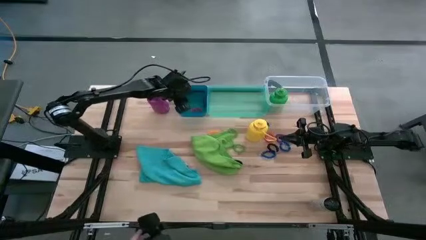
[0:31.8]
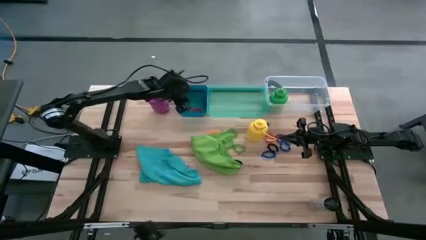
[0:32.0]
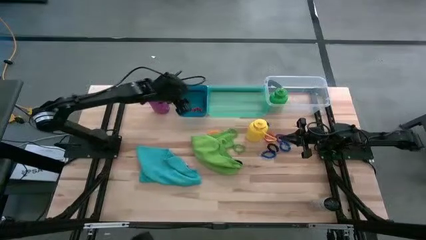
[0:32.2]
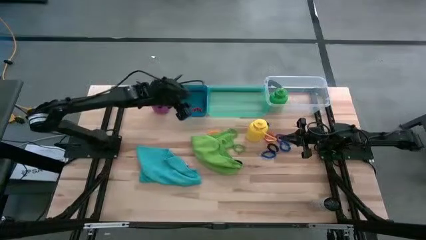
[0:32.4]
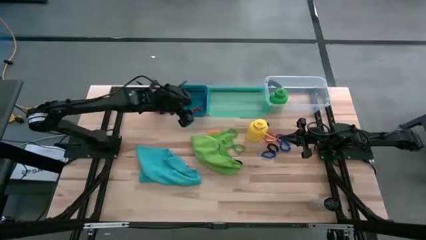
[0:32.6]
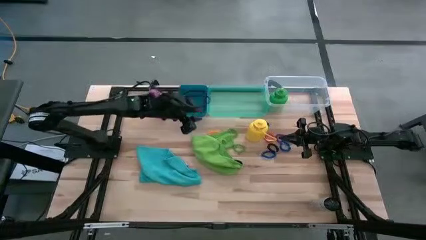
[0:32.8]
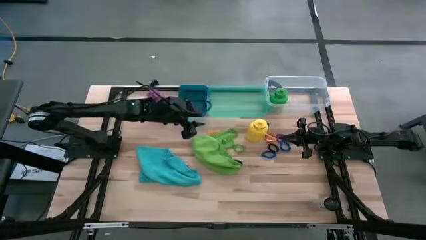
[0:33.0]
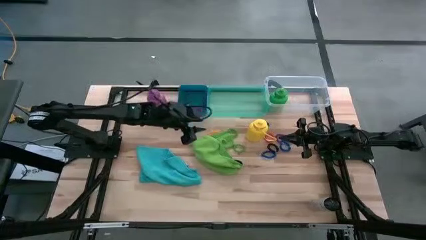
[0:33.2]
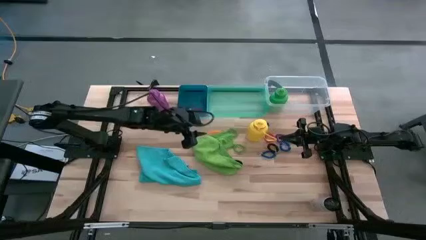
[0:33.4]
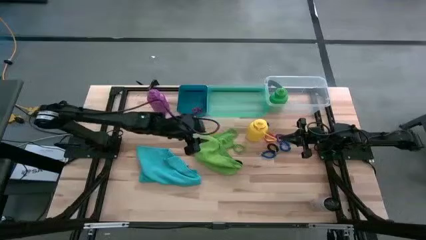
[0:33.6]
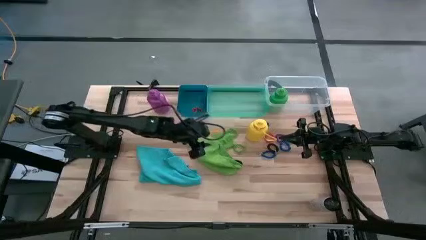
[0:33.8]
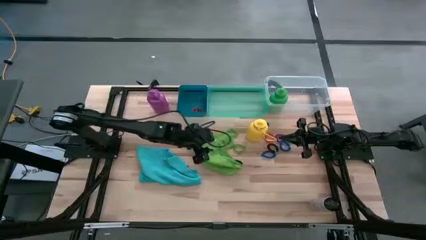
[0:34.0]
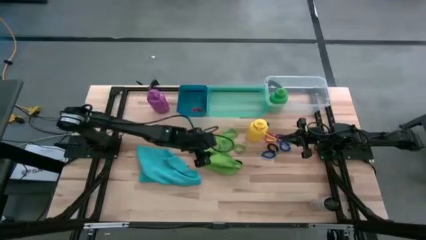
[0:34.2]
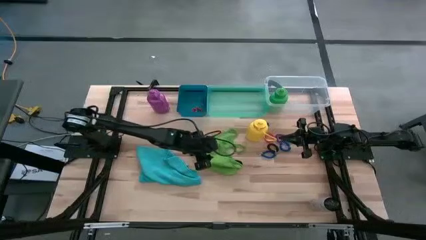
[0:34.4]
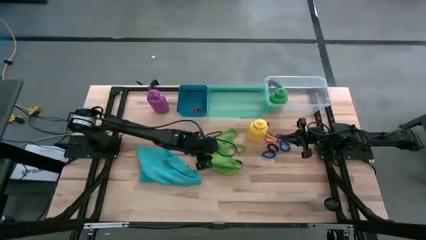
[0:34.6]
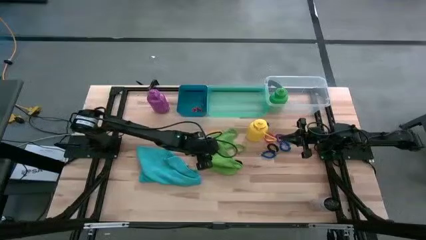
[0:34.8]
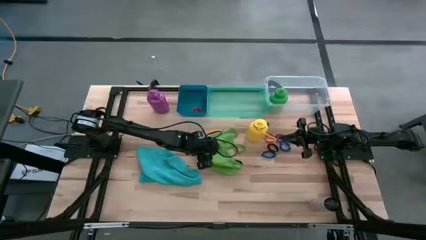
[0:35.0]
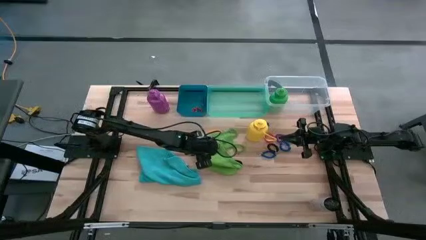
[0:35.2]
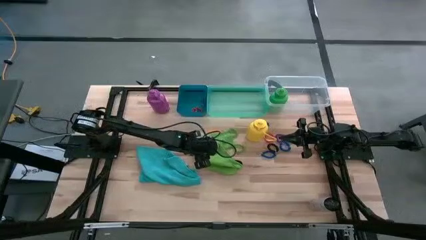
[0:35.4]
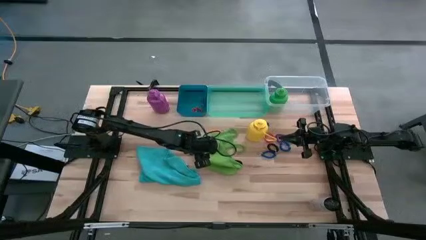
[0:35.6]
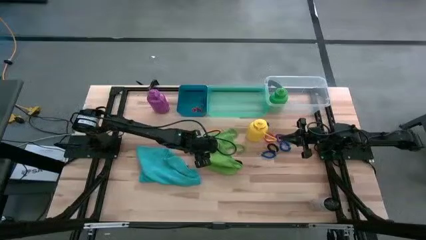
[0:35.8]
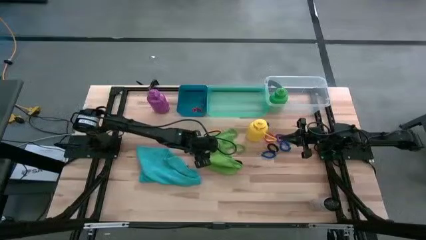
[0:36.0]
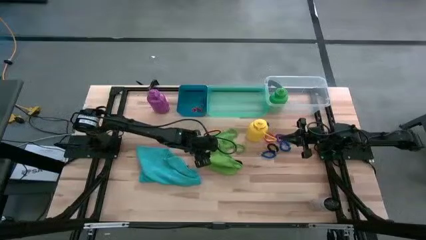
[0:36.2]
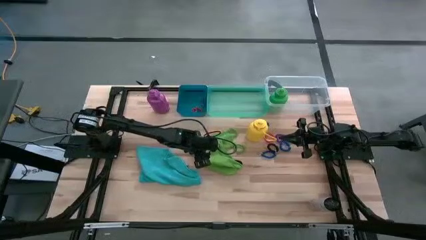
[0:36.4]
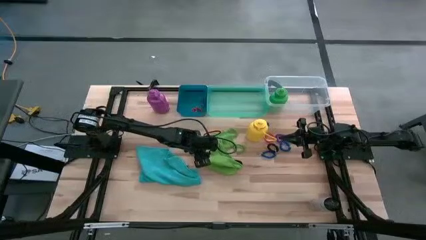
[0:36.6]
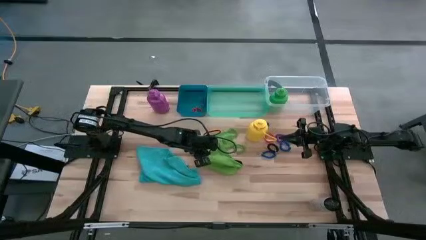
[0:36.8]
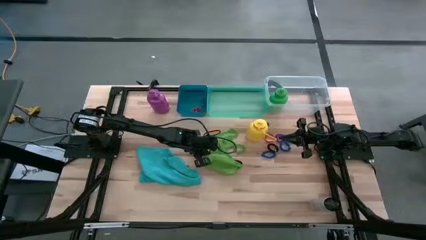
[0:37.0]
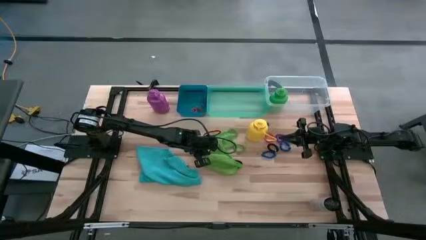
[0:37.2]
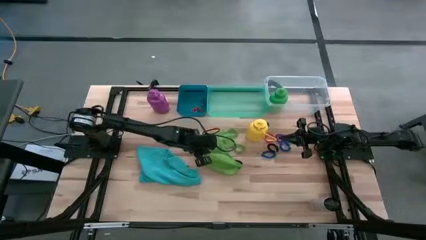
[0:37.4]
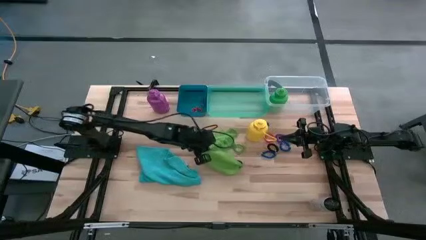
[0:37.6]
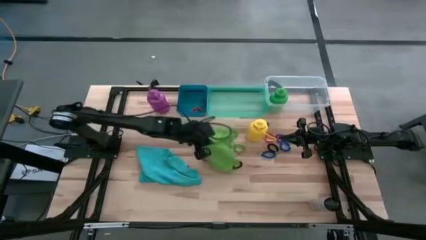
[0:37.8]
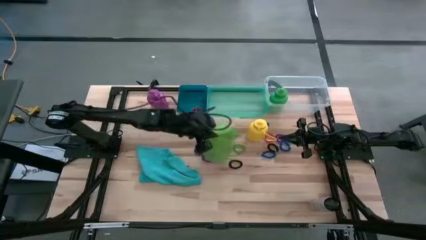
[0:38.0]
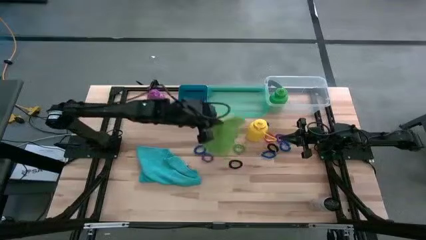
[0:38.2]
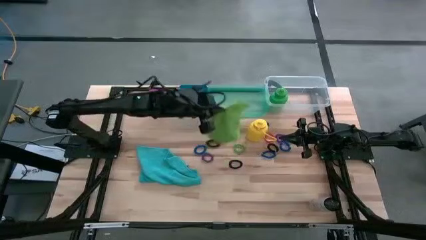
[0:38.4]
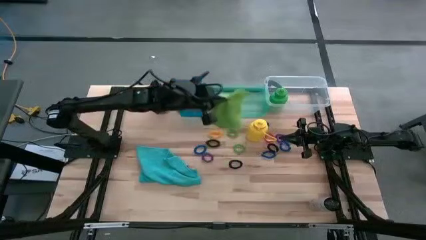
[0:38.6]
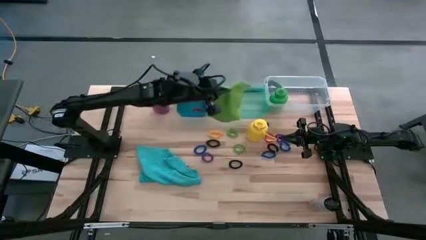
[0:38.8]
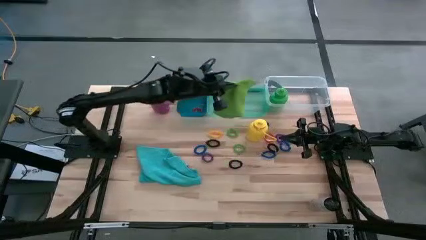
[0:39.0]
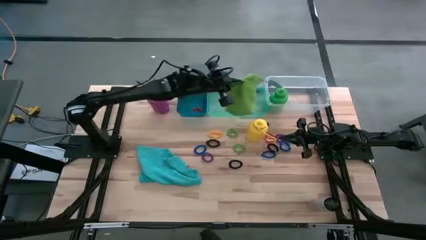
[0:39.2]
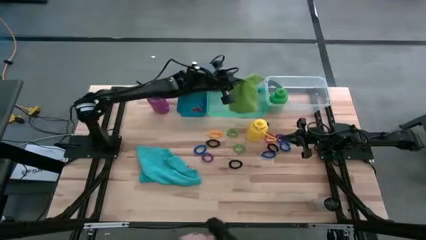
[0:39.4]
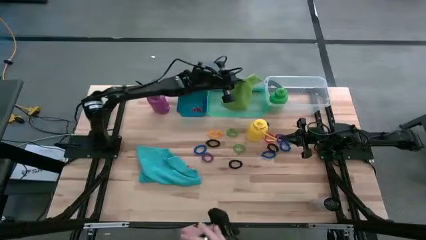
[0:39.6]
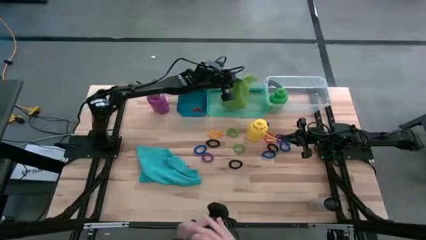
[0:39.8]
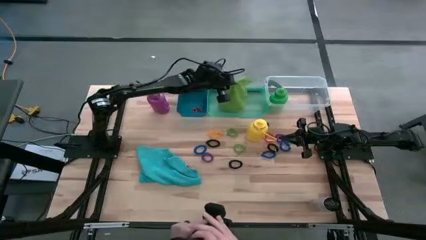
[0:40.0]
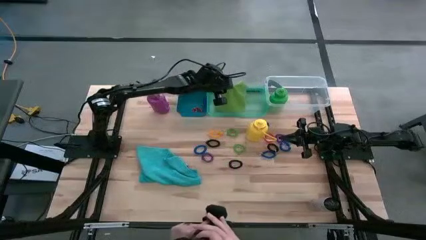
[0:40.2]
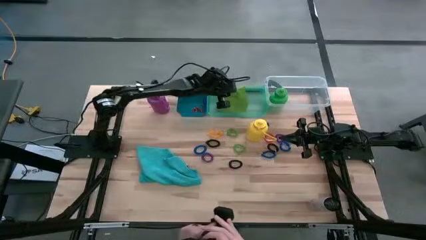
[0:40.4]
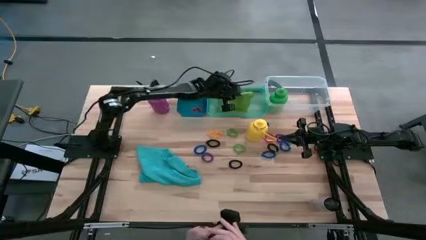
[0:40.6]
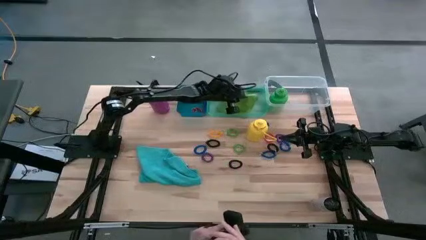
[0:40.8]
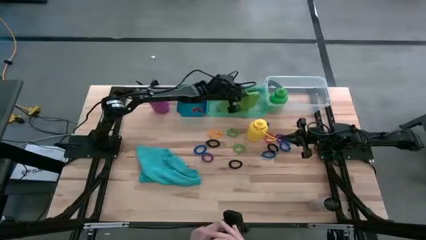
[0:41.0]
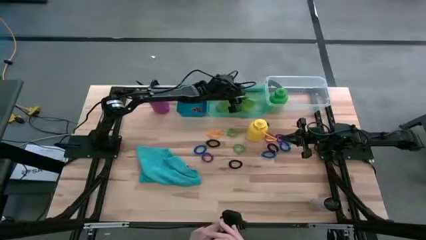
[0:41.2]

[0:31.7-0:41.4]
Task: Pick & Place Sports Items
Put the green towel into the green bin

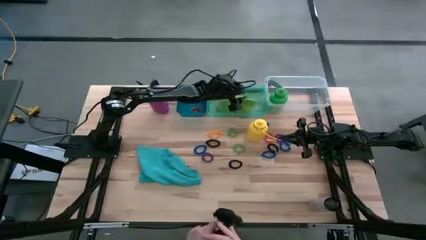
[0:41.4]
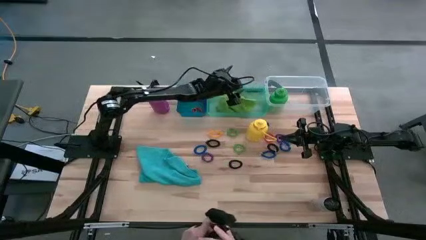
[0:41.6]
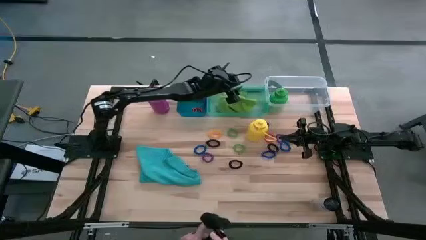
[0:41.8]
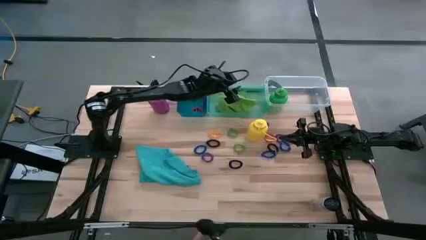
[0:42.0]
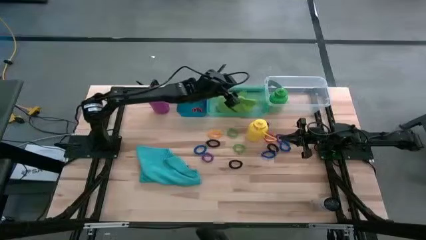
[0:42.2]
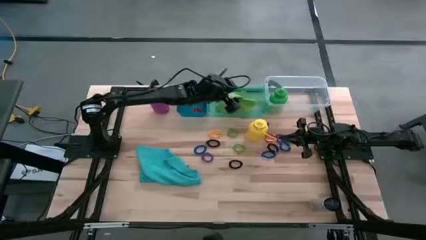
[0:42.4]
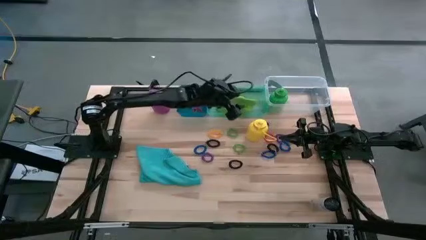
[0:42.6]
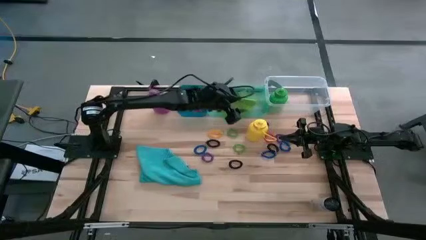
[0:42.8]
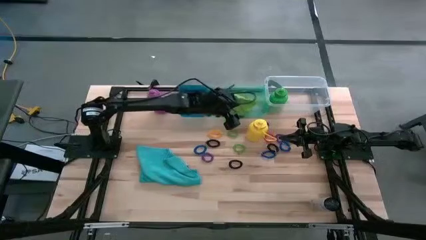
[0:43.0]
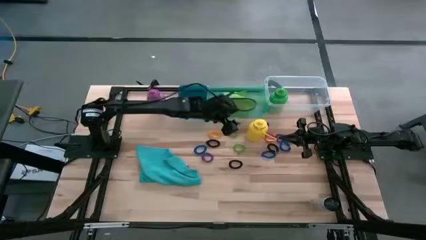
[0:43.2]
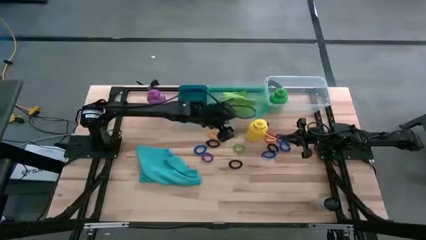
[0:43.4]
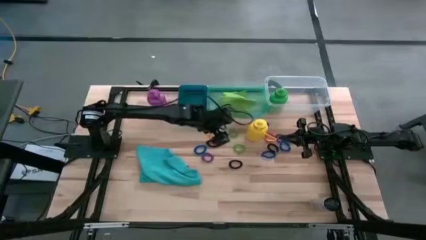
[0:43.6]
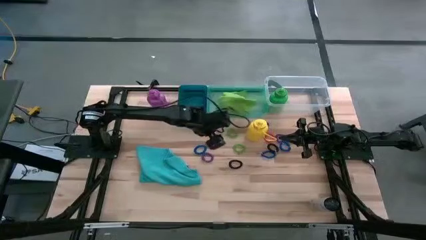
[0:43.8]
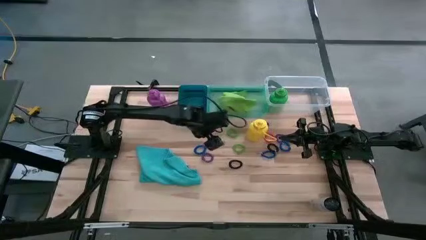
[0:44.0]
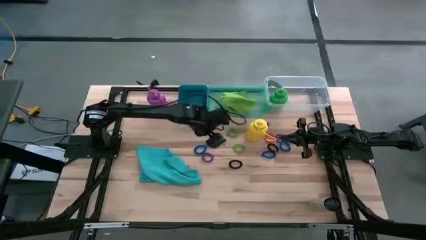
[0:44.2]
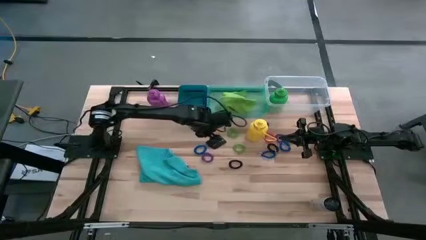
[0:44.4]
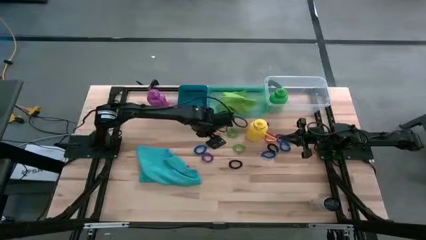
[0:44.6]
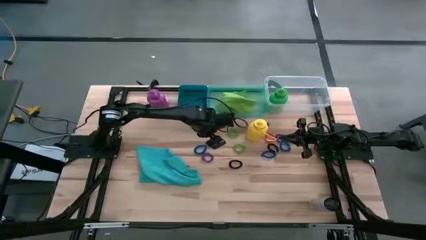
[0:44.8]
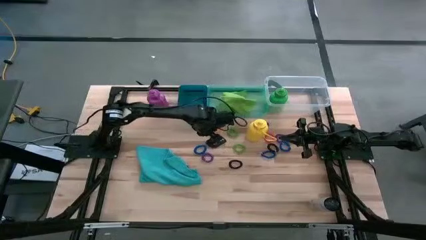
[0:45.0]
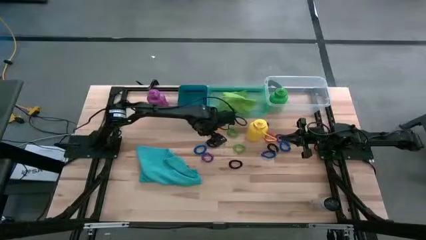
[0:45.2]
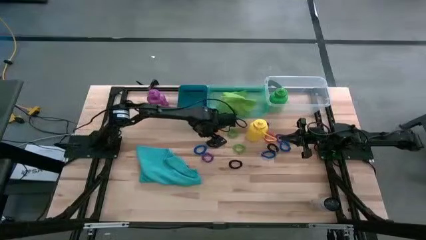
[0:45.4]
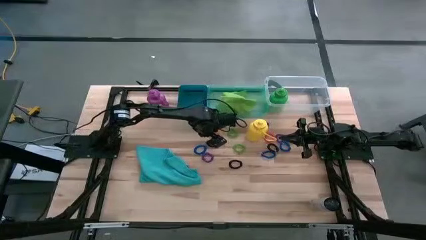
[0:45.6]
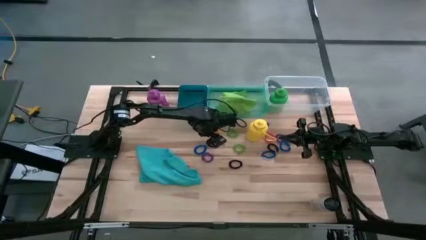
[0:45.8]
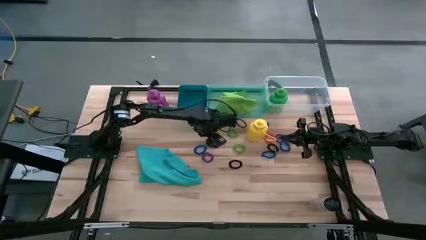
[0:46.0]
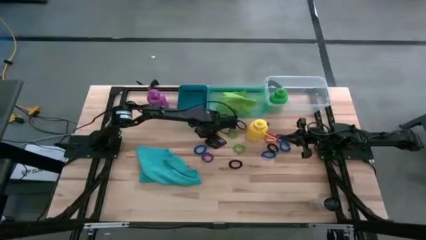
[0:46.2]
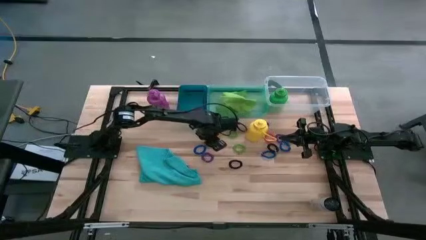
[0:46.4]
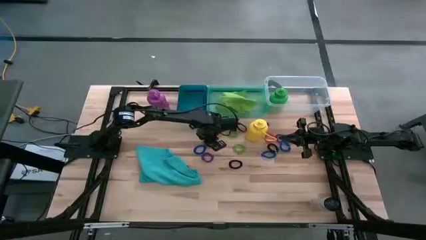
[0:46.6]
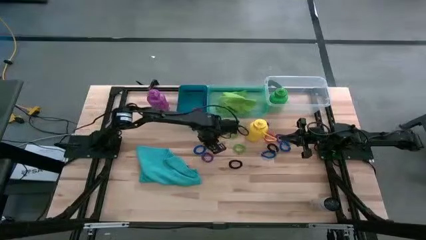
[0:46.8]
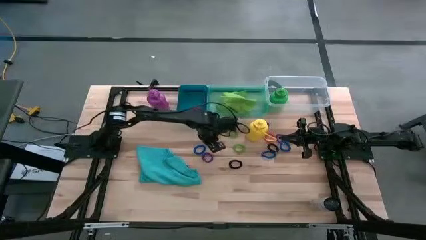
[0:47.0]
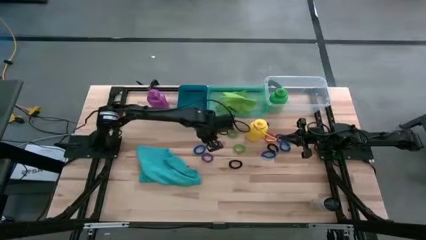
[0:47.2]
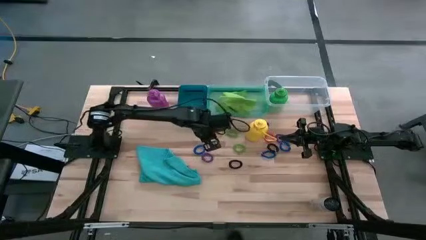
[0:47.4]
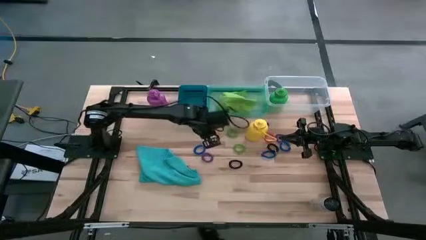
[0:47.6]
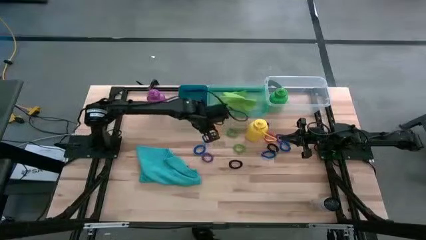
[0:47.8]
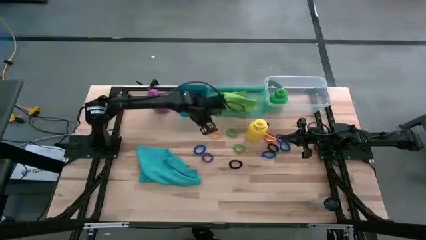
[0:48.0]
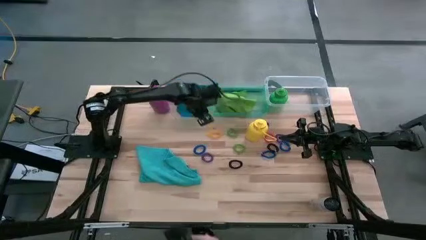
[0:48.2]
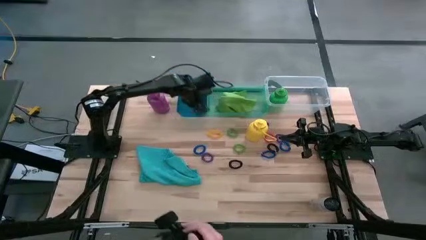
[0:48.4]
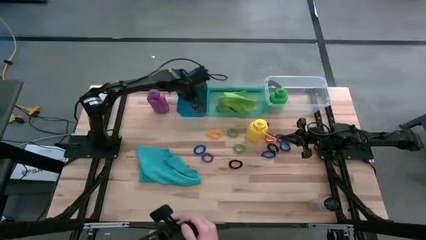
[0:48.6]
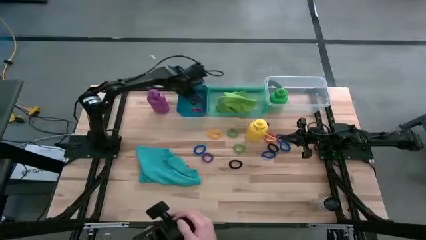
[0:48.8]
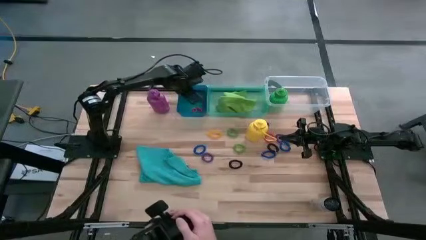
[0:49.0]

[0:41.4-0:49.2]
Put the left black spring keychain into the blue bin
